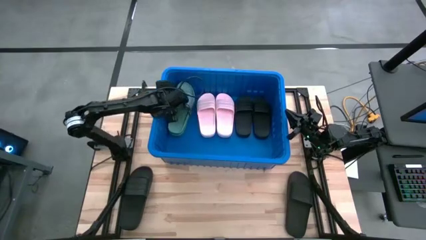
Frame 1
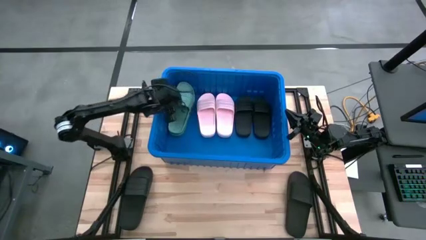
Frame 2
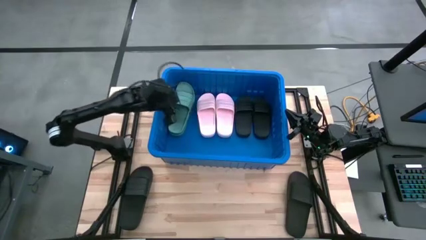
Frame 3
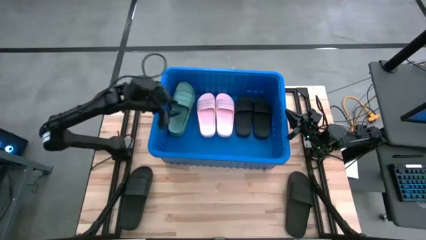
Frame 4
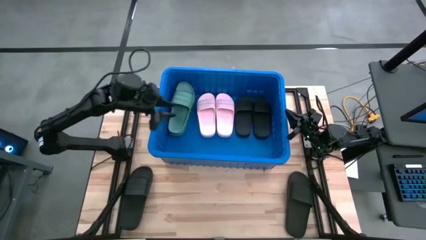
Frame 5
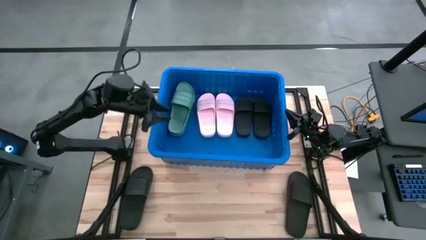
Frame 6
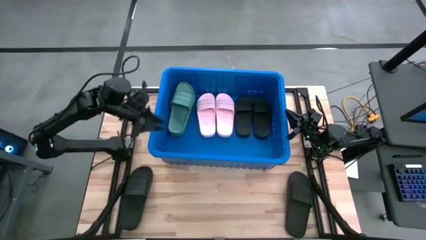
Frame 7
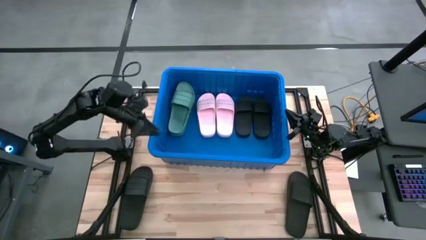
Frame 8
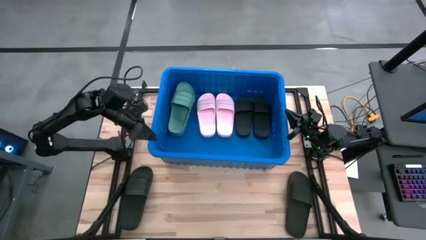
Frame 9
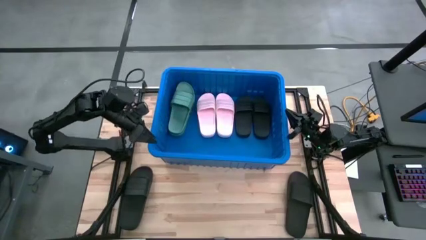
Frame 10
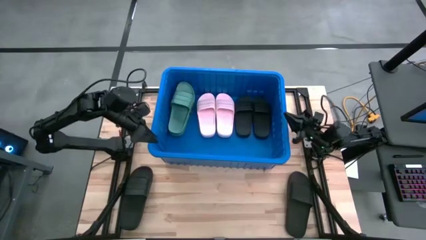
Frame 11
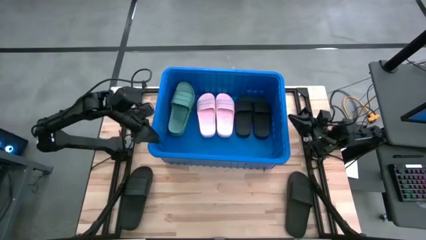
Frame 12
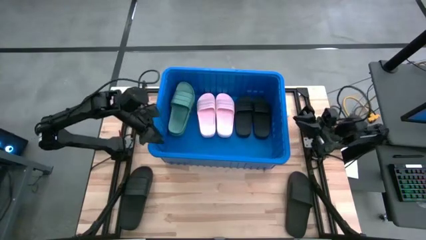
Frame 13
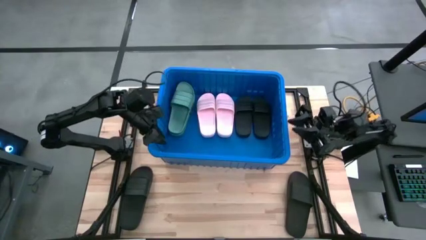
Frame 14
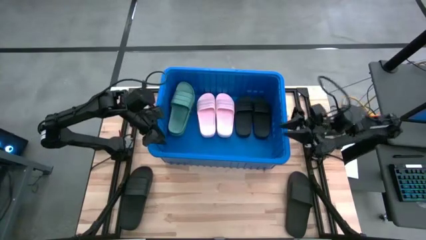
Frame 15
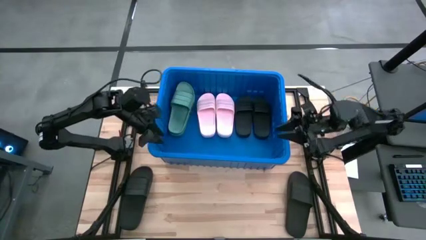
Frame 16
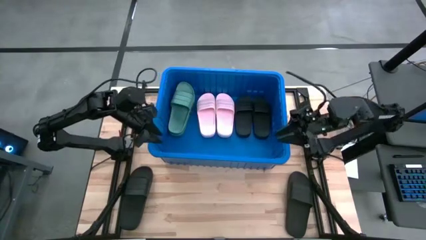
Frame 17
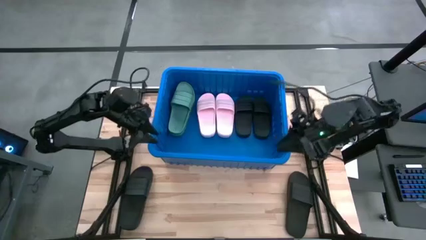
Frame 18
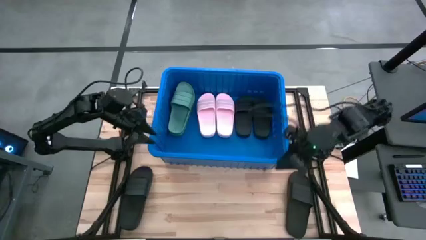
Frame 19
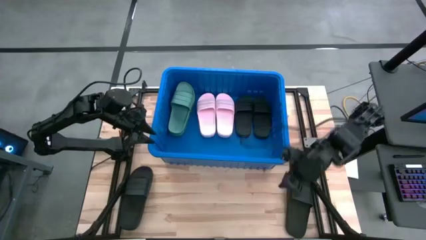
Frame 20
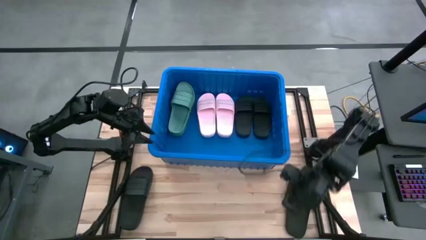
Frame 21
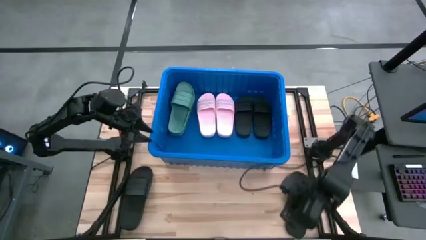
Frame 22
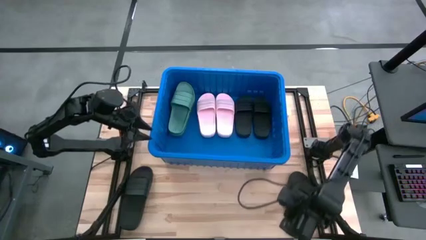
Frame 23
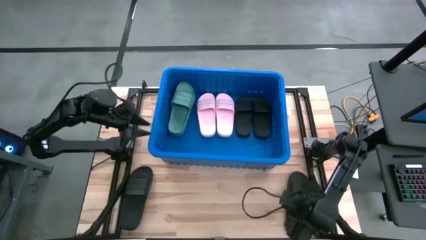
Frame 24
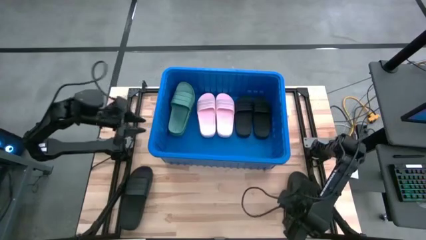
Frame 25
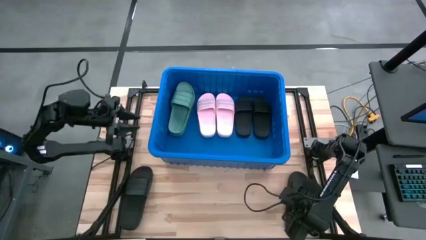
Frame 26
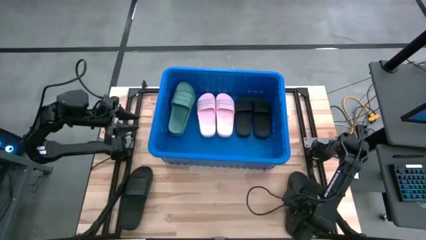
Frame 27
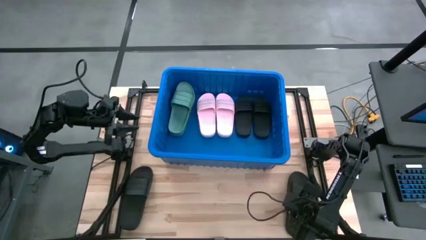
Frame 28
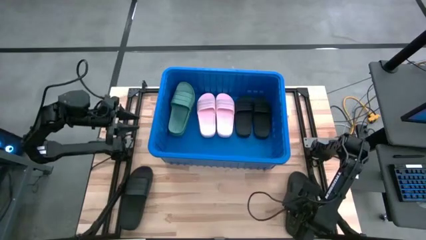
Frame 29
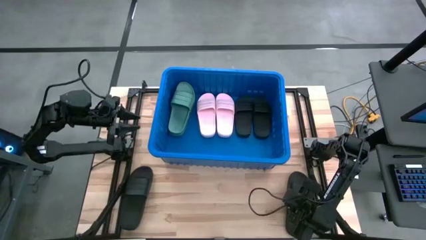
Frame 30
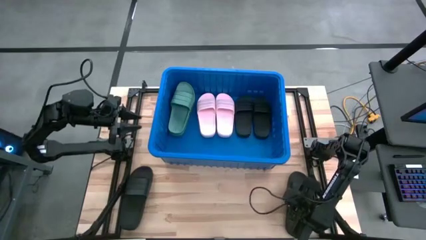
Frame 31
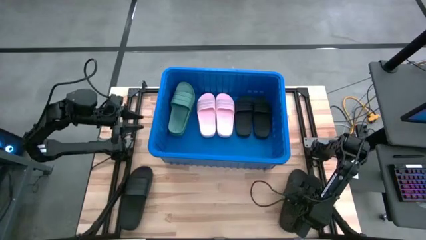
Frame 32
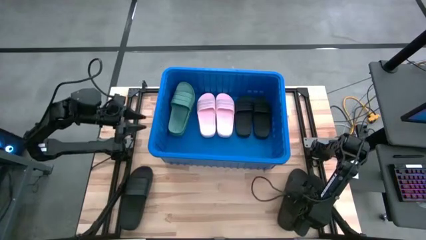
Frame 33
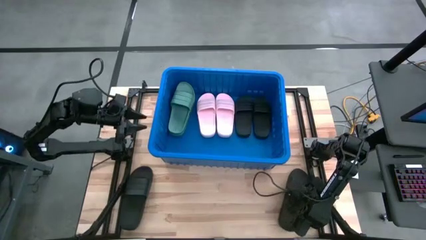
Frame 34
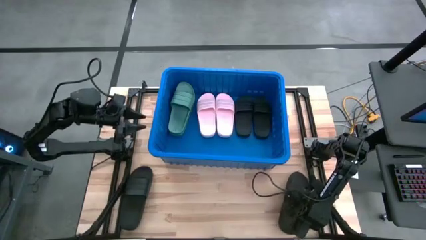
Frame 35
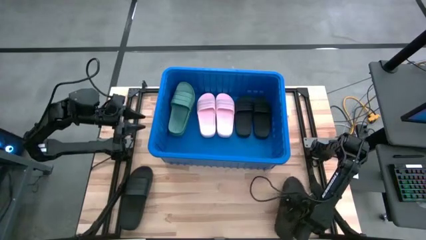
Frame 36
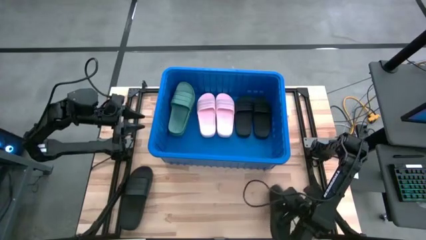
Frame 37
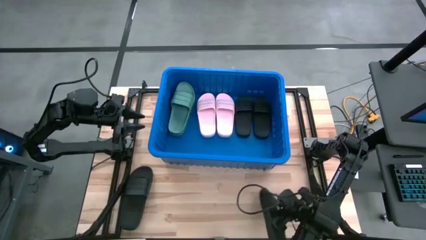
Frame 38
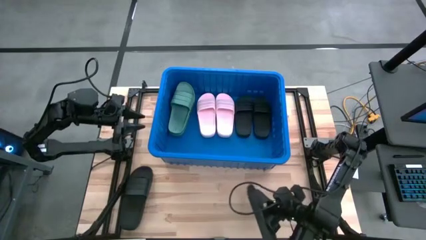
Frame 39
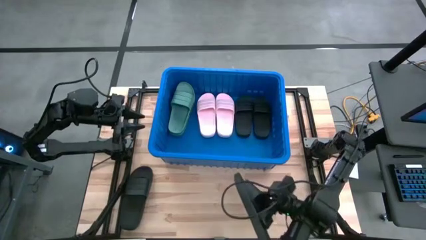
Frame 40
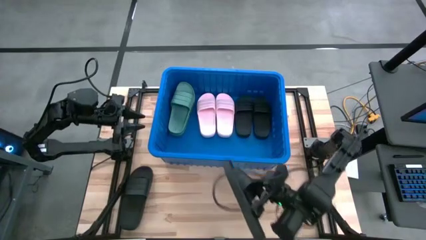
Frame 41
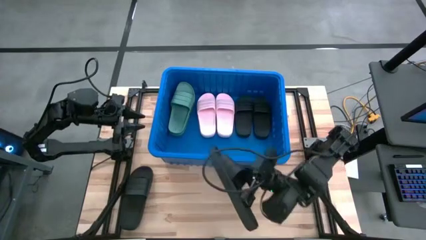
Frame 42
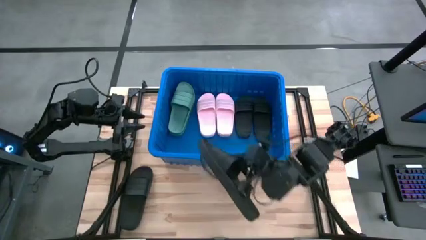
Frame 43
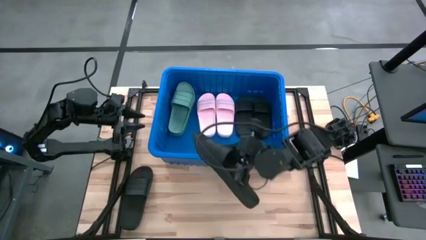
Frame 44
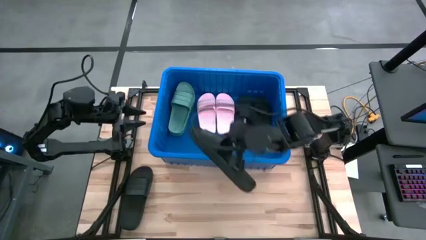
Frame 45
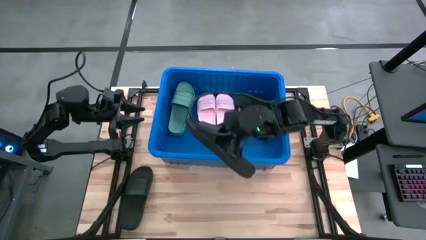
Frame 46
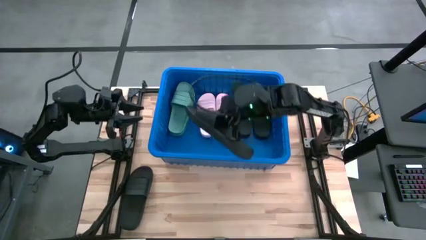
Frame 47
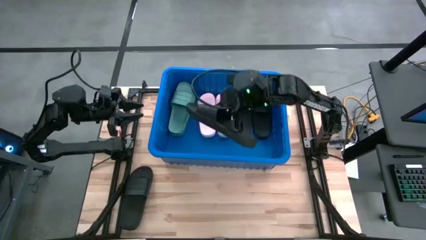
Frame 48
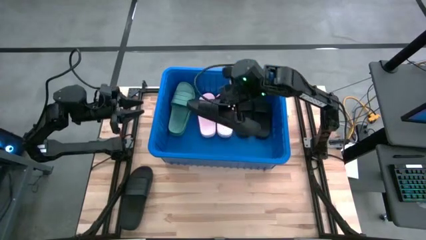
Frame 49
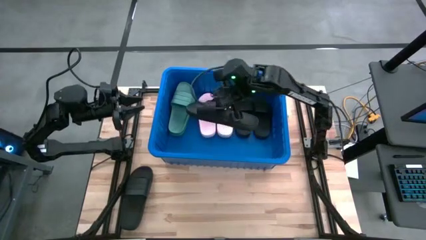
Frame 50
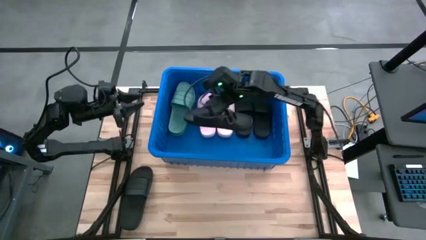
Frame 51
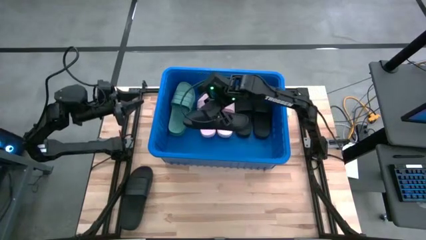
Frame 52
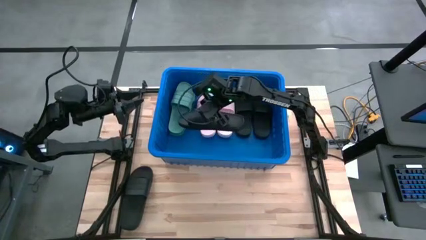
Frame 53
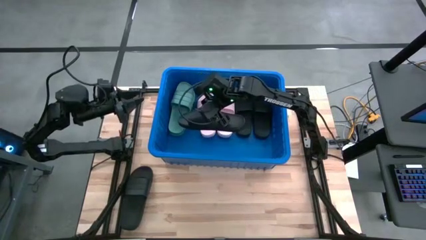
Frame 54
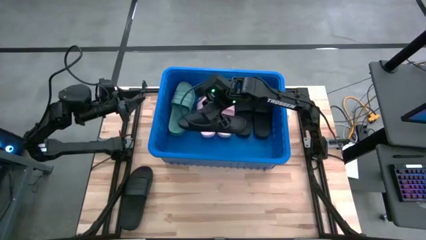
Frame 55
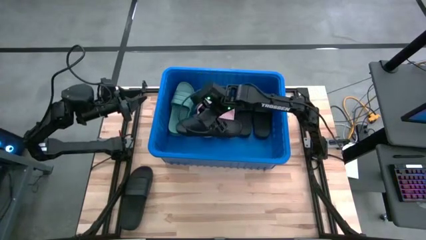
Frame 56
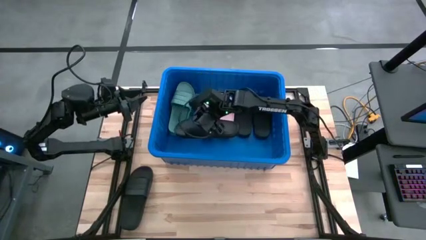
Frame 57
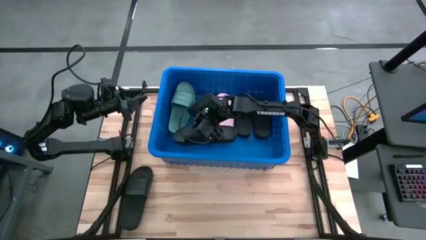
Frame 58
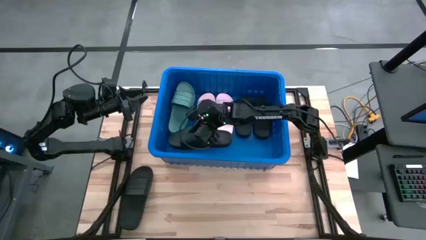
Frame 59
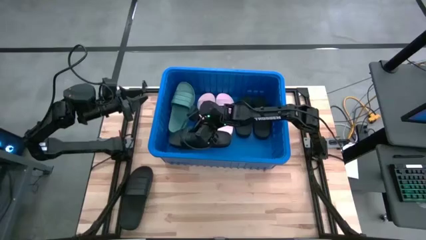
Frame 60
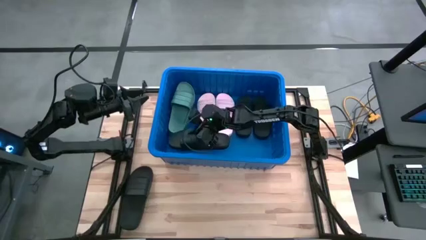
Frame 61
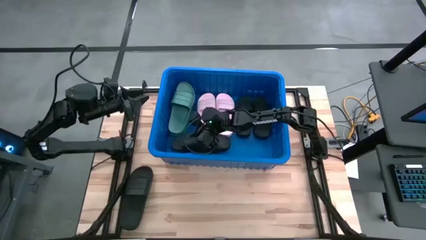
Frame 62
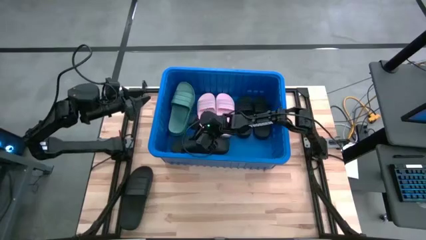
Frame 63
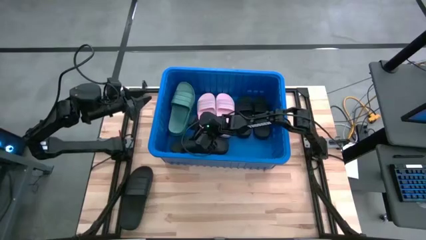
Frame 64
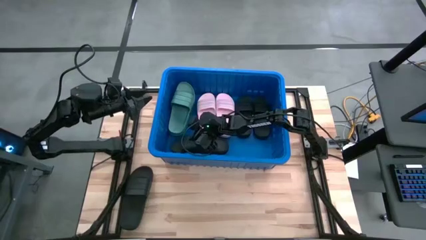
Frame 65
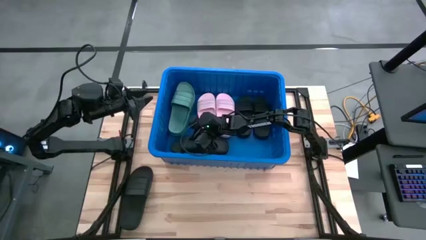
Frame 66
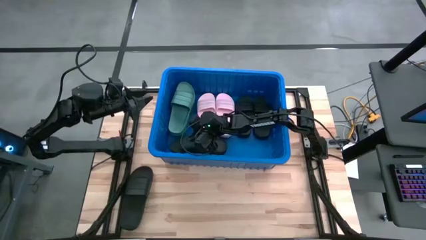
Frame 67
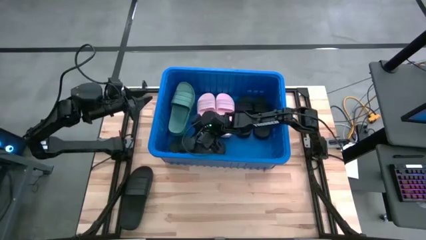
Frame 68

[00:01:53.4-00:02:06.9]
Task: Pick and place slides into bin
Put the right black slide into the blue bin
